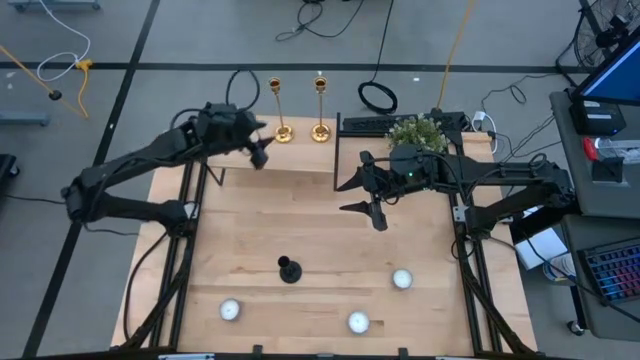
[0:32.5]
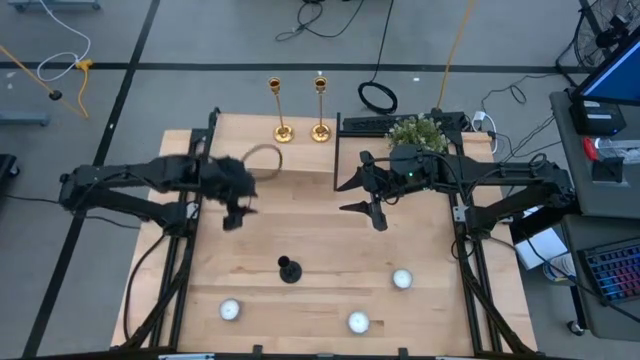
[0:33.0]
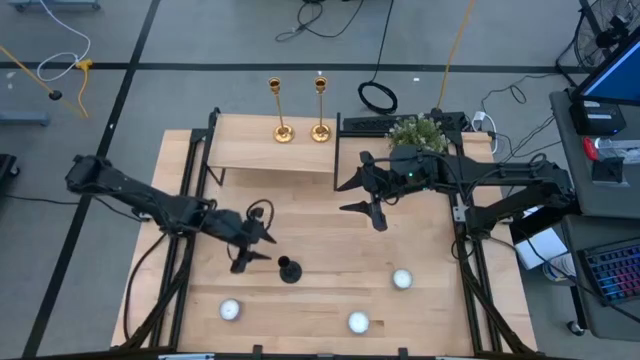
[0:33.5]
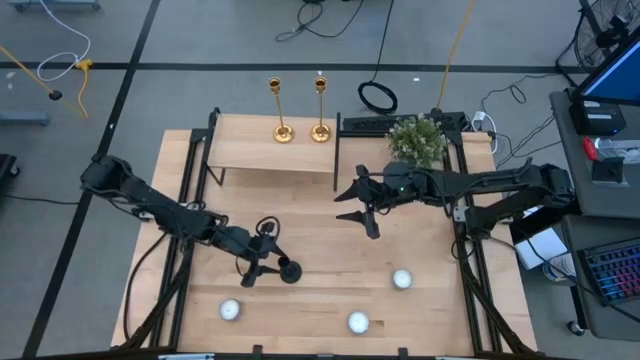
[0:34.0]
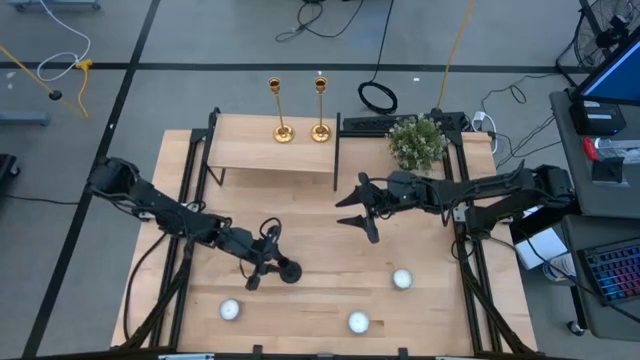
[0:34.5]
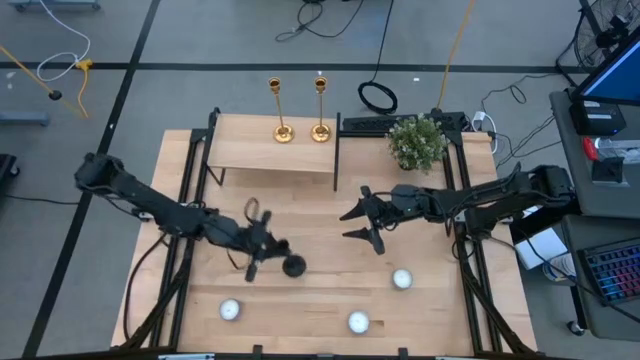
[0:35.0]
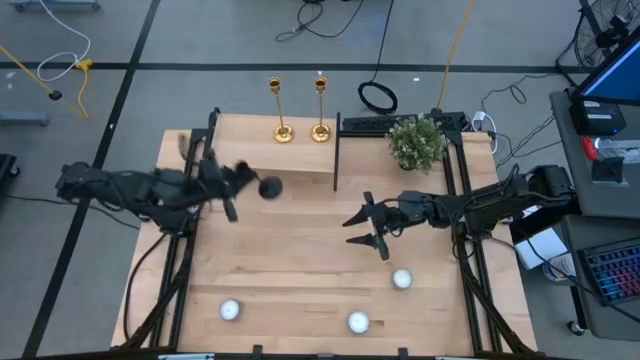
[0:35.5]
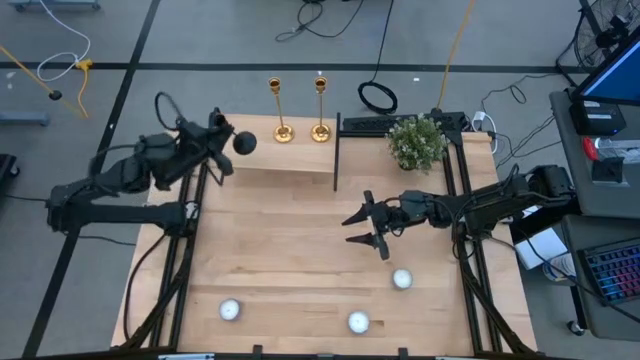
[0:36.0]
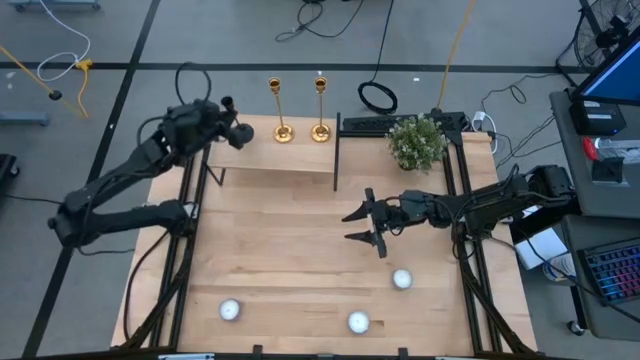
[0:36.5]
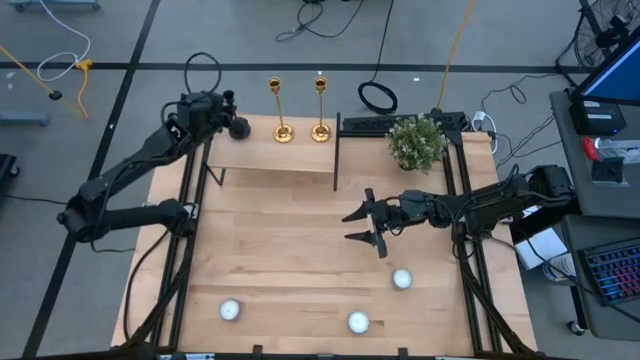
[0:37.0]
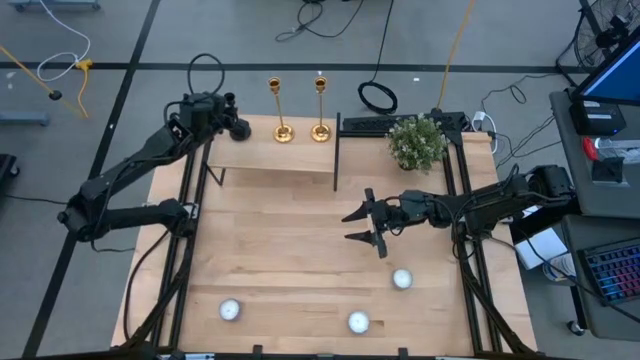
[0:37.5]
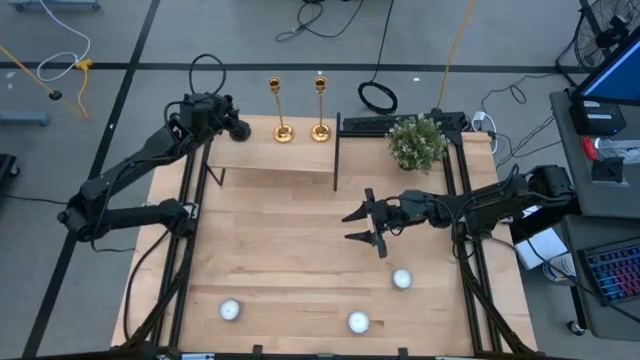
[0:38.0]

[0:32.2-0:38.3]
Task: Pick & Place candle stick holders
Put the black candle holder on the shelf

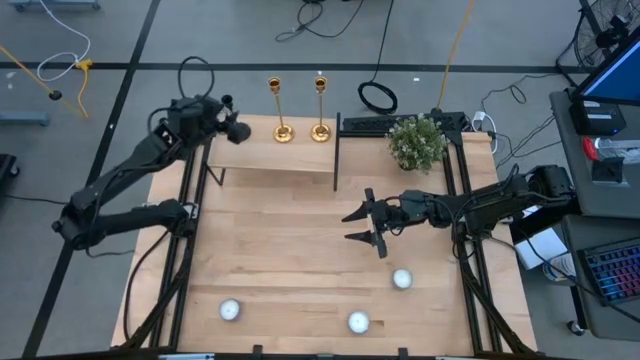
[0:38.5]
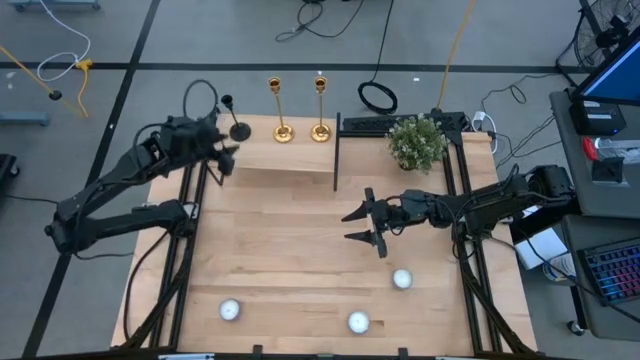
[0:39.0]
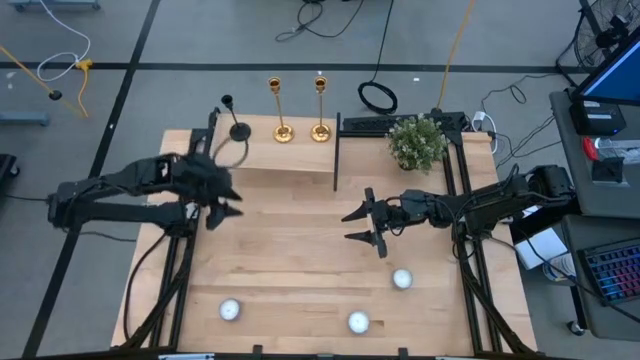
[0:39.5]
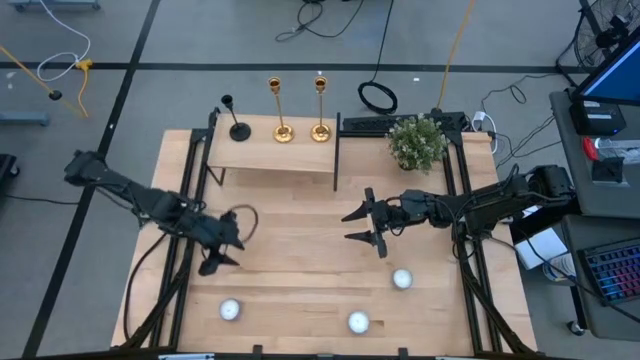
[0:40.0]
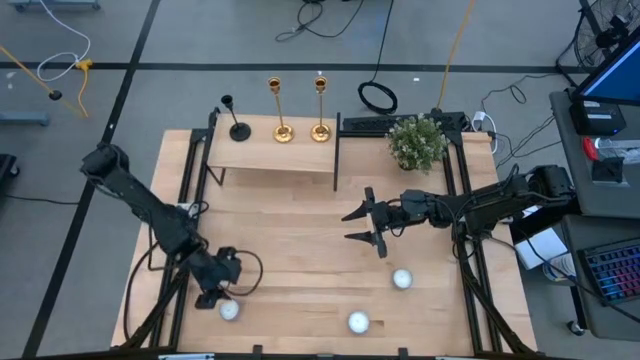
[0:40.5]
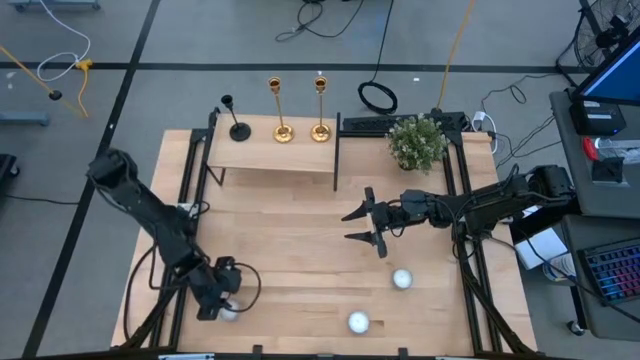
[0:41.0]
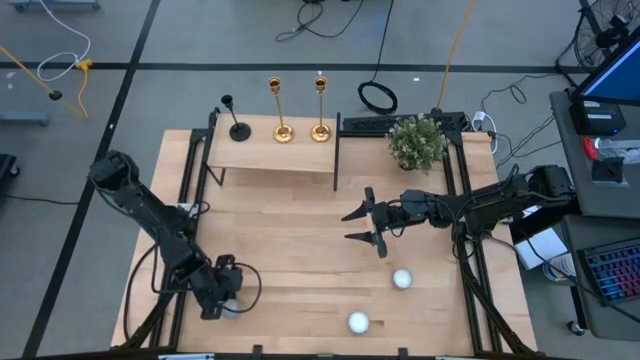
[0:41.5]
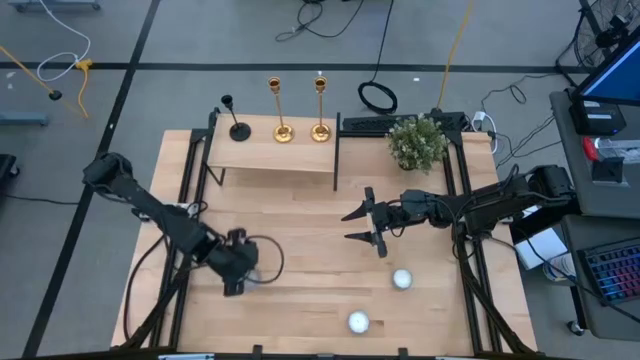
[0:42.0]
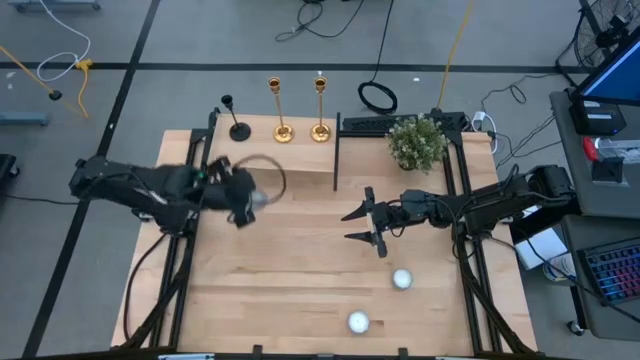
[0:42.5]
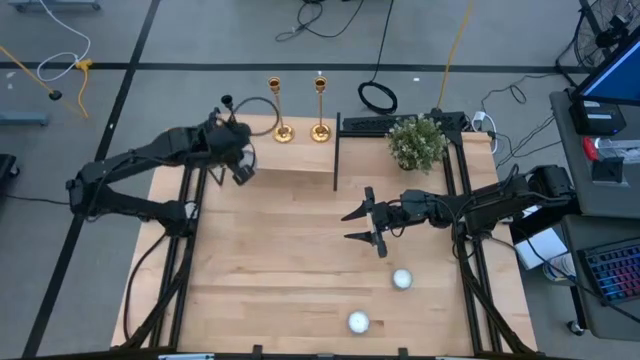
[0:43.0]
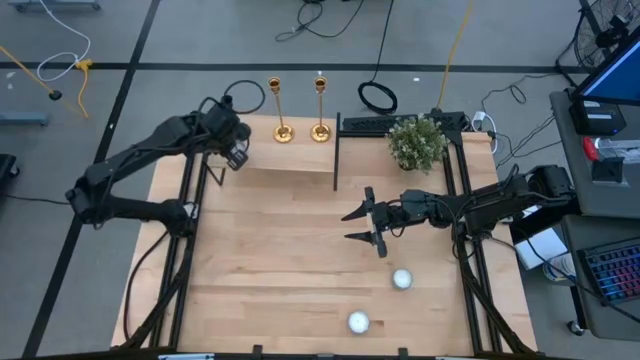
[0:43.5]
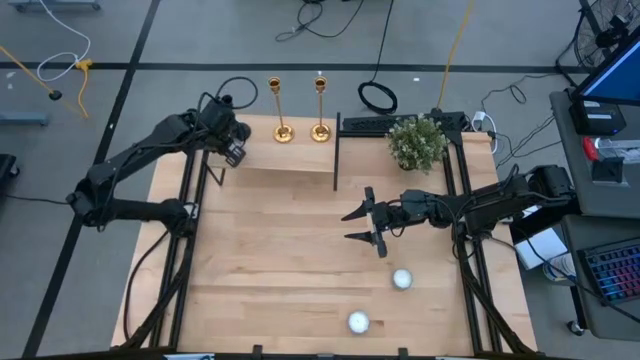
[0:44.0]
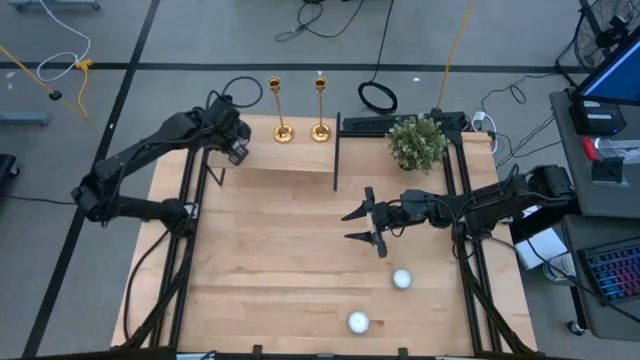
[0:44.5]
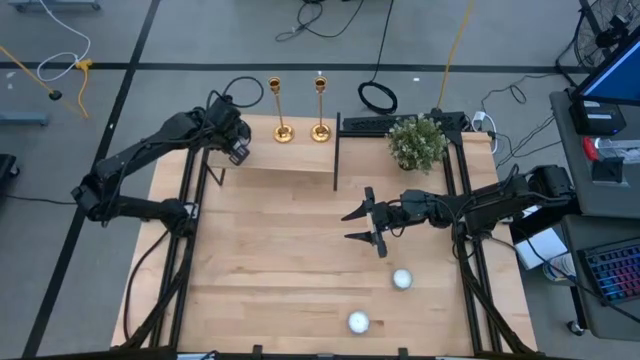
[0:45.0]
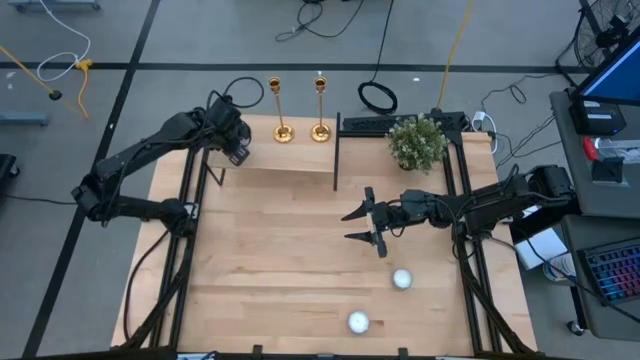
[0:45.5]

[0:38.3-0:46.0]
Put the pink patterned scented candle on the shelf

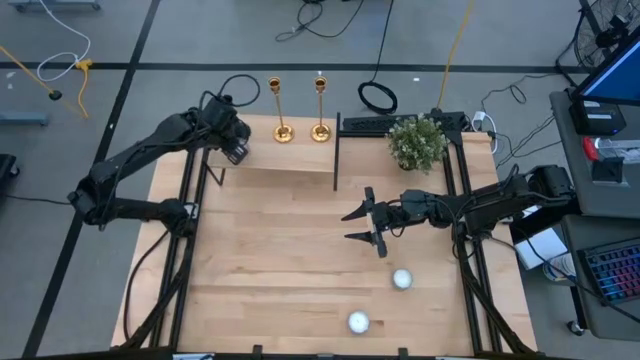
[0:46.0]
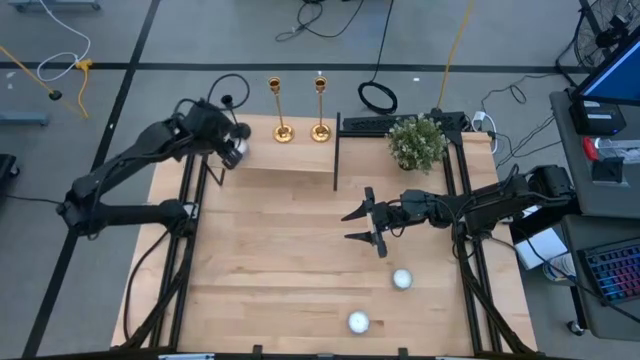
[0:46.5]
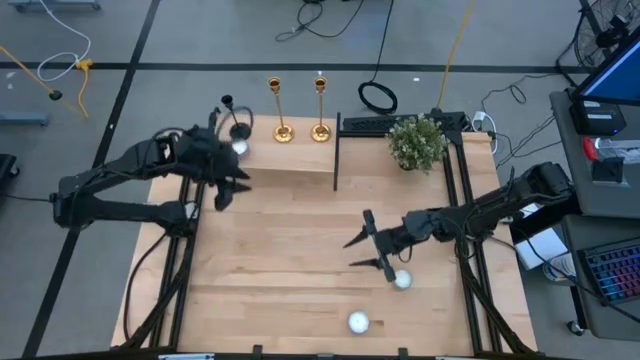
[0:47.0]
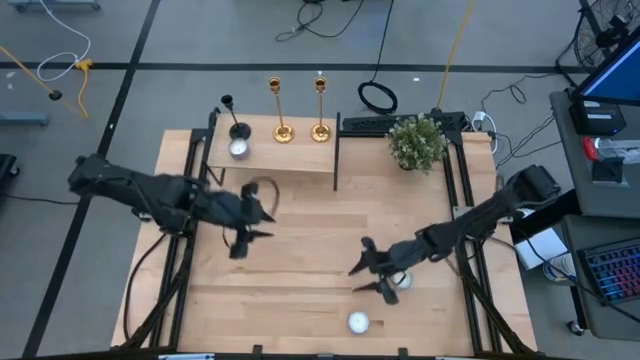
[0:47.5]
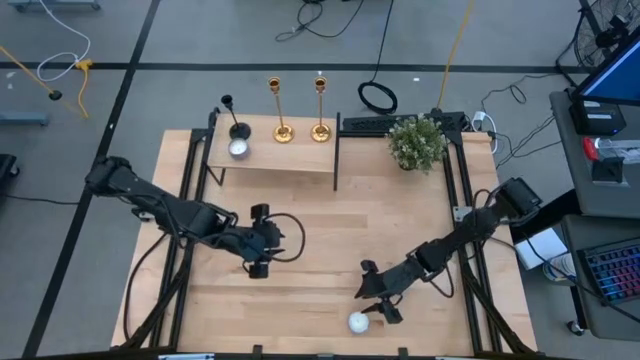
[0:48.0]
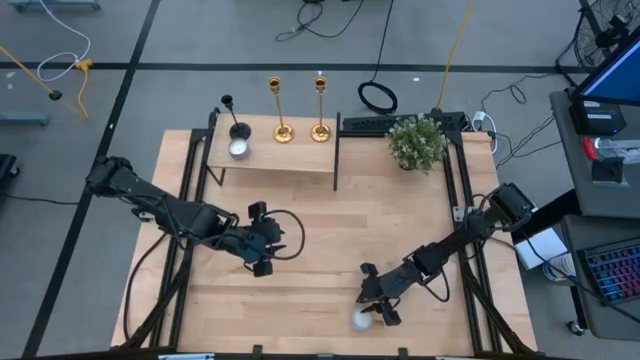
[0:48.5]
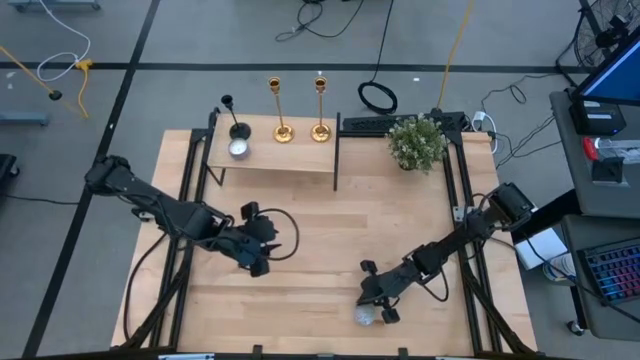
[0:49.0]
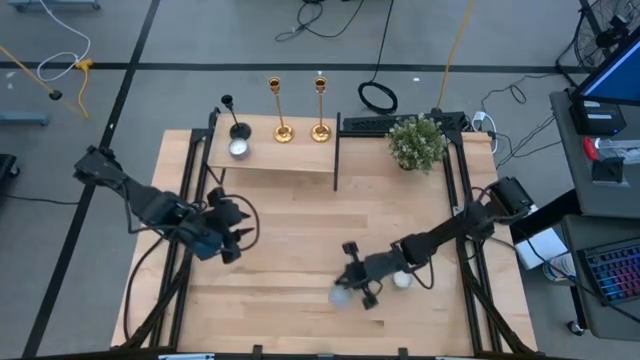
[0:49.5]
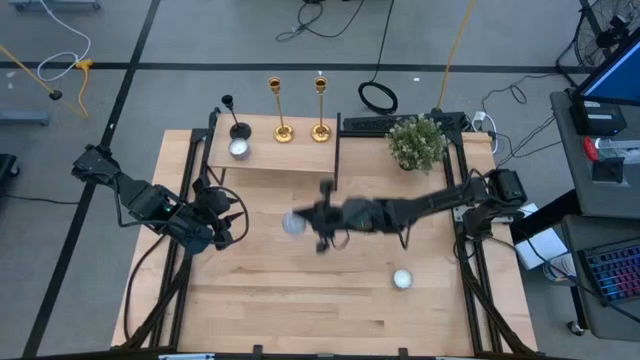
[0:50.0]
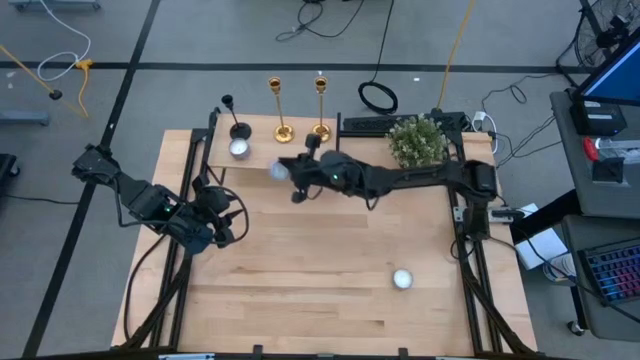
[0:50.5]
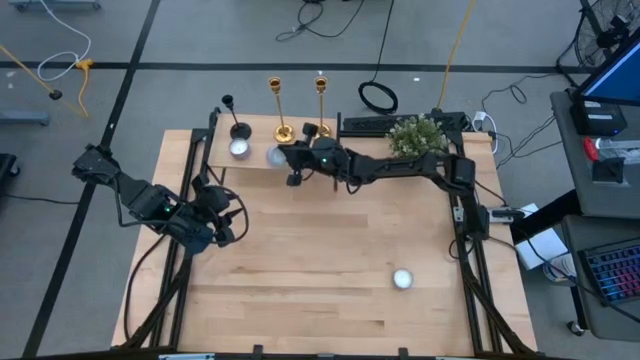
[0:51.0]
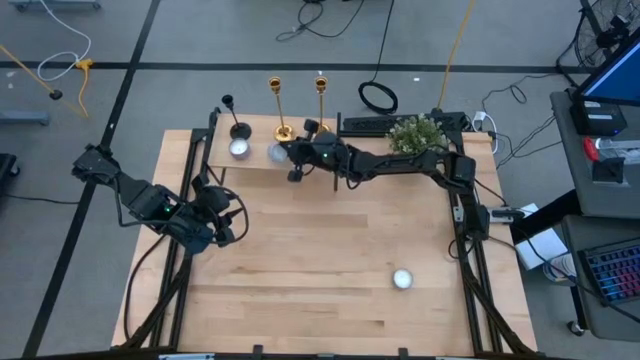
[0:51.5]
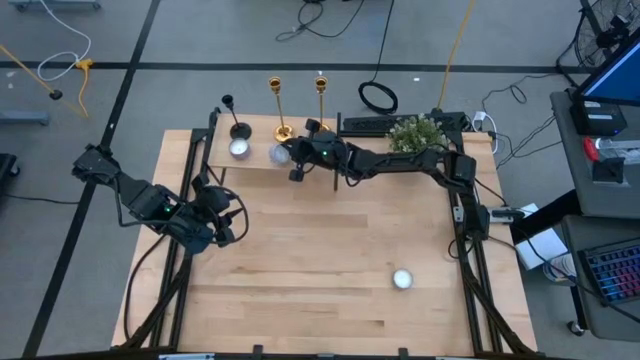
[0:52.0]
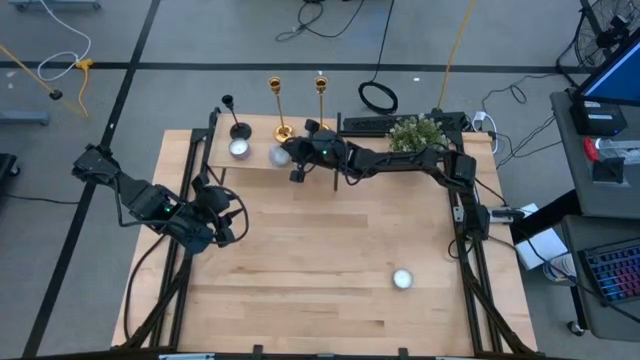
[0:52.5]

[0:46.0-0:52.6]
Put the white patterned scented candle on the shelf
